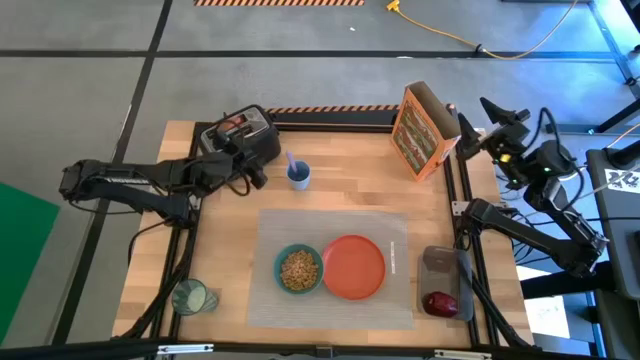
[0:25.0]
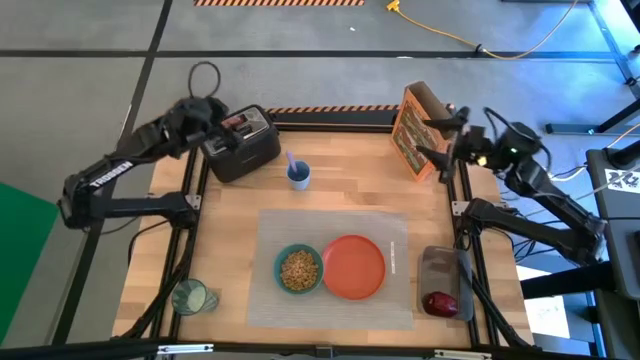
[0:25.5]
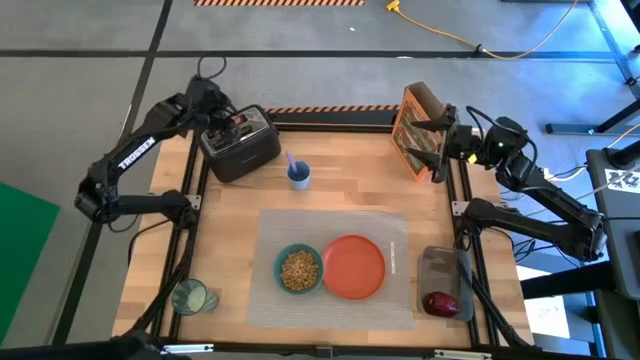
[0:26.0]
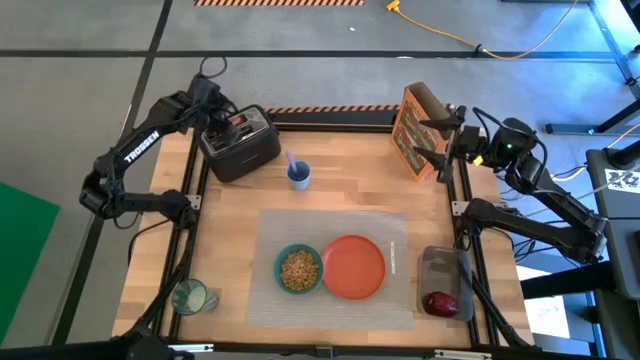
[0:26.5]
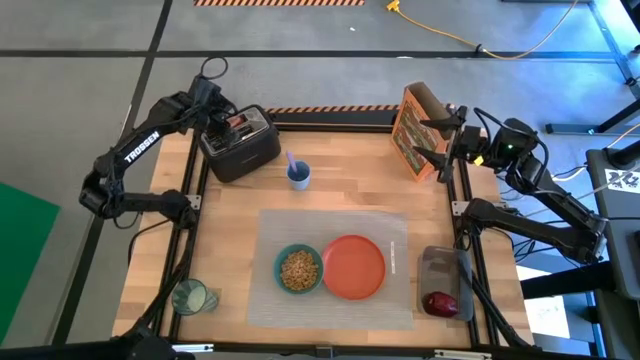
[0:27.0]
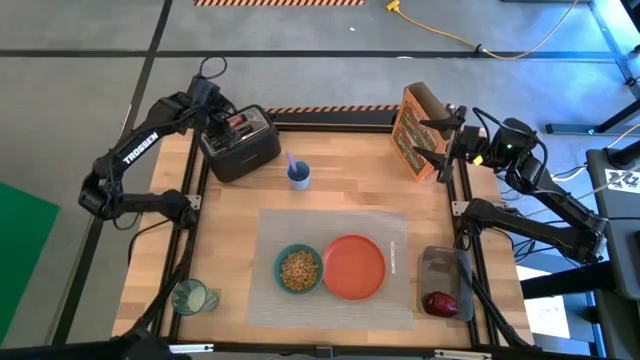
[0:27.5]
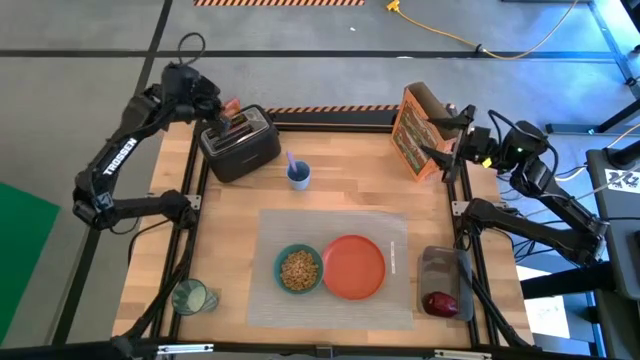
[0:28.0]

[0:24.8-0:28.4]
Task: Arrange a breakfast setting
Put the toasted bread from the toaster onto the orange plate

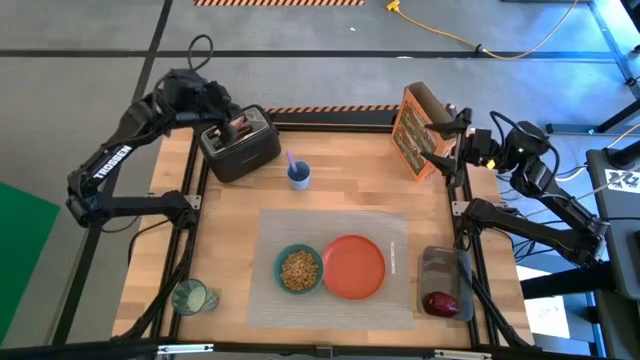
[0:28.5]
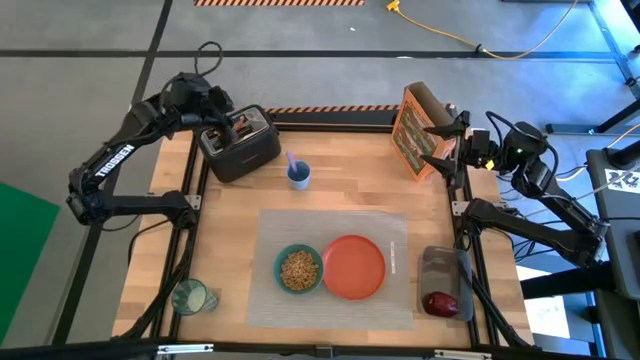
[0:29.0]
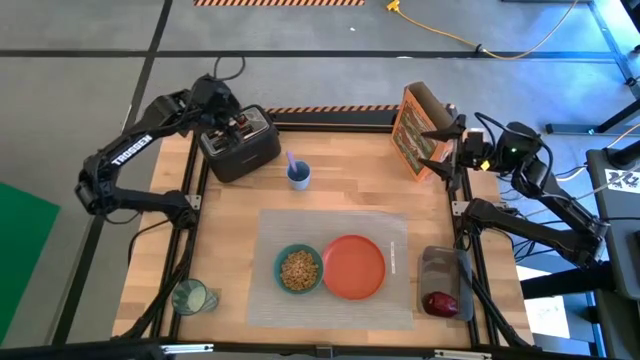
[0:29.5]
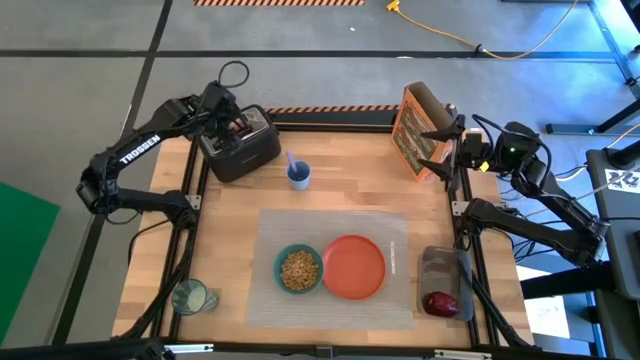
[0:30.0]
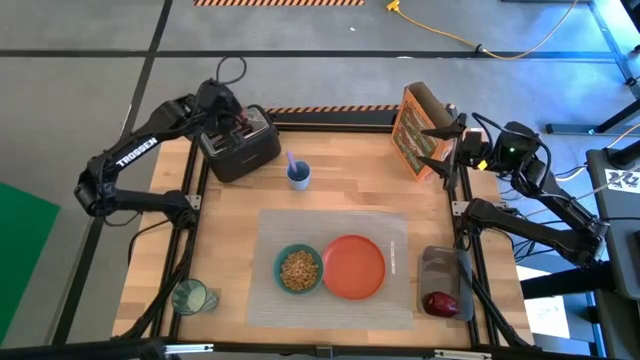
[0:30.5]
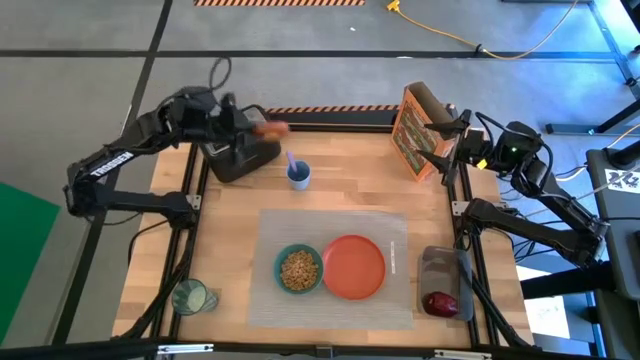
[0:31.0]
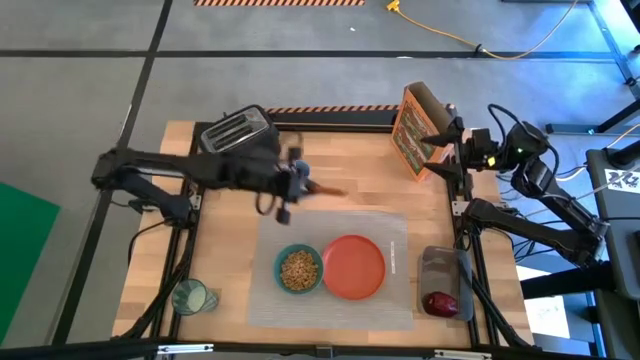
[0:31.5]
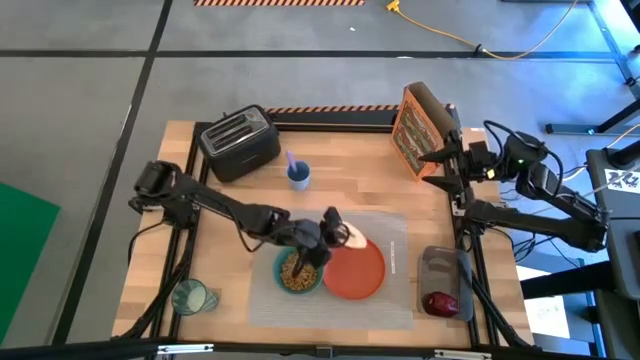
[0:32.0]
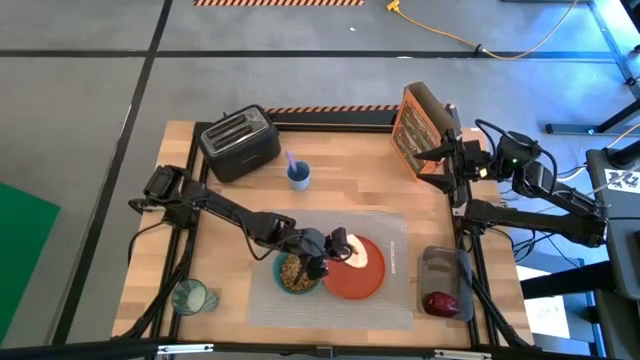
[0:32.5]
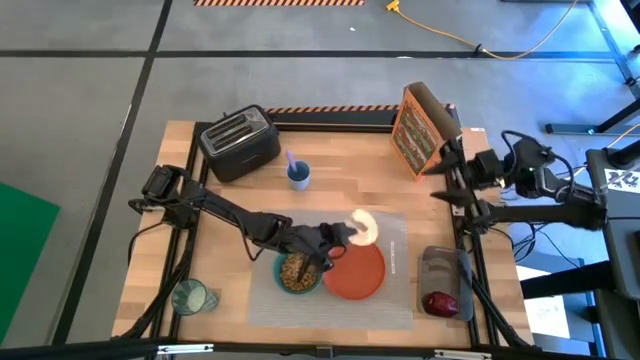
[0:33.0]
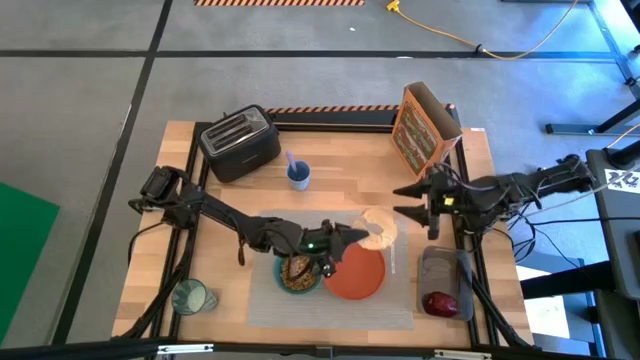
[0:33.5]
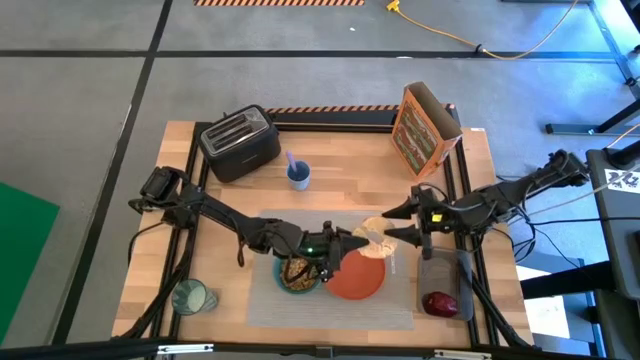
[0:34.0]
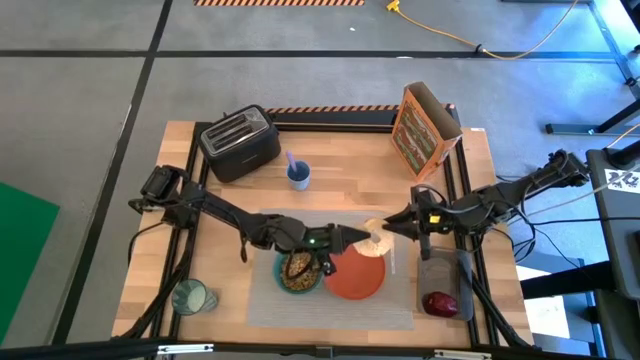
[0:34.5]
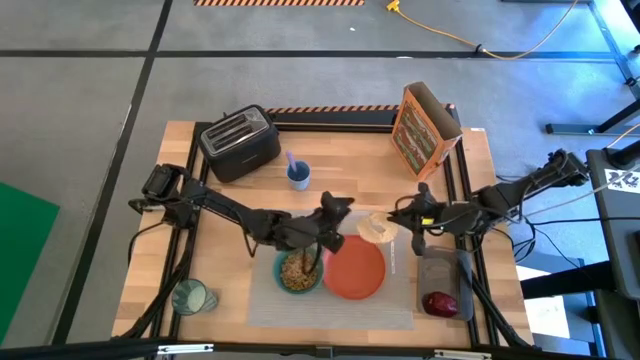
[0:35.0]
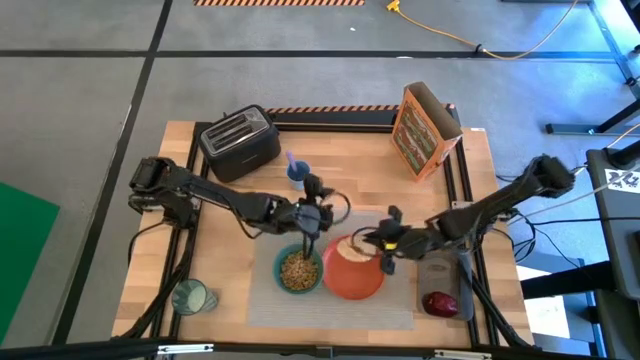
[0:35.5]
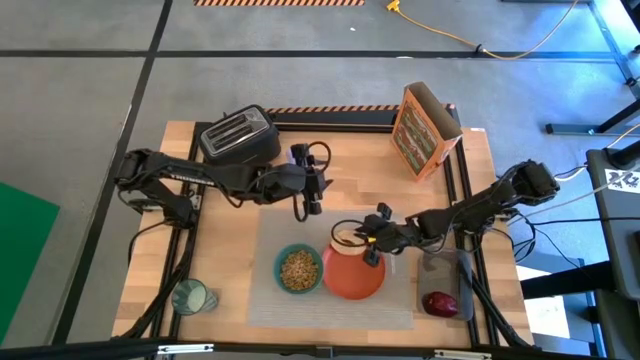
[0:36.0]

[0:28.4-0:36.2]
Put the toasted bread from the toaster onto the orange plate

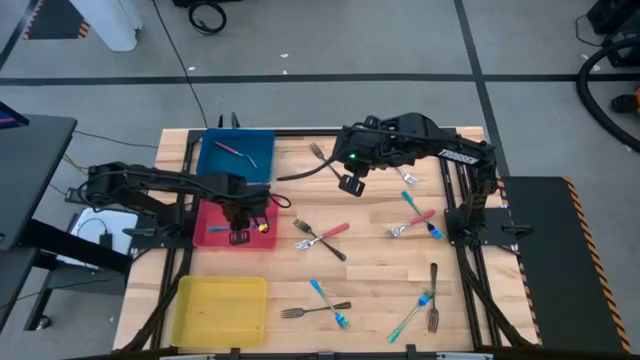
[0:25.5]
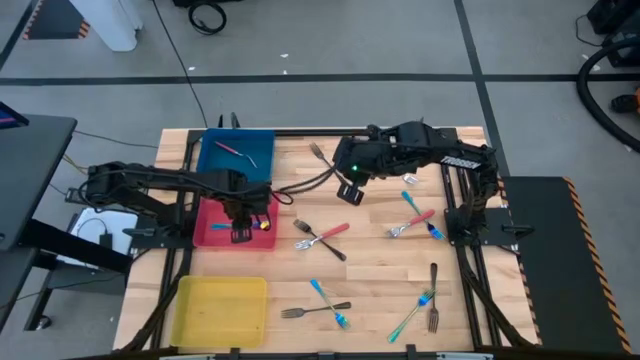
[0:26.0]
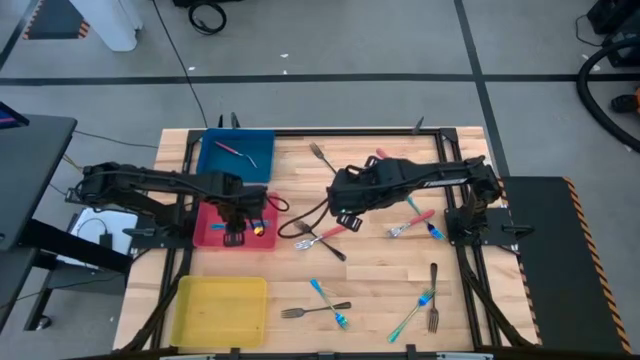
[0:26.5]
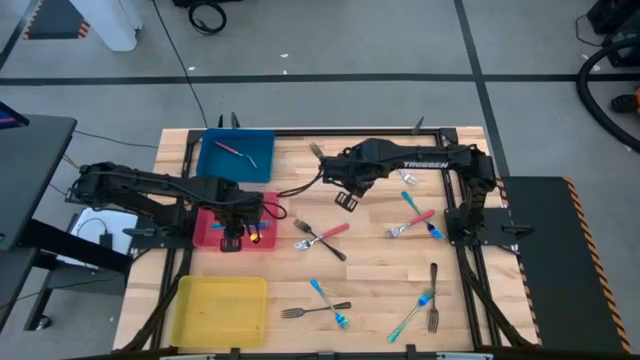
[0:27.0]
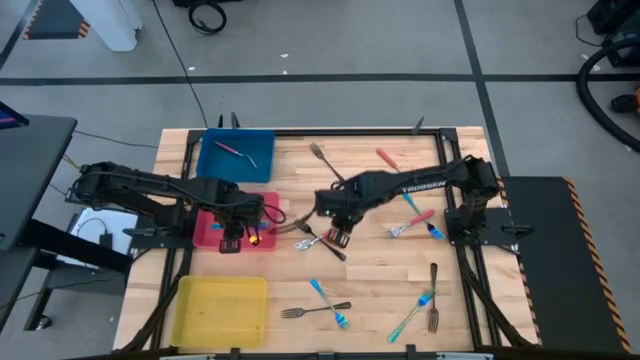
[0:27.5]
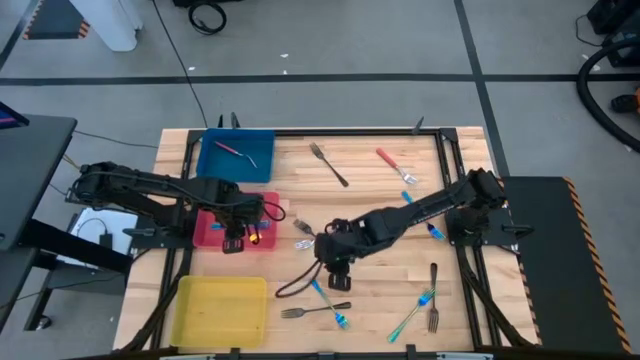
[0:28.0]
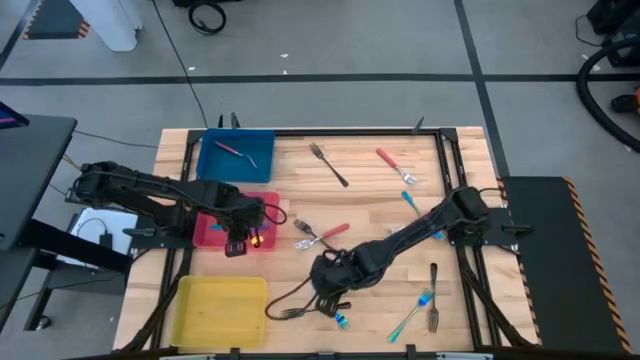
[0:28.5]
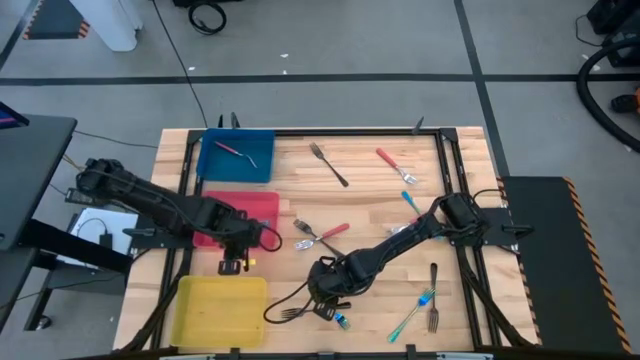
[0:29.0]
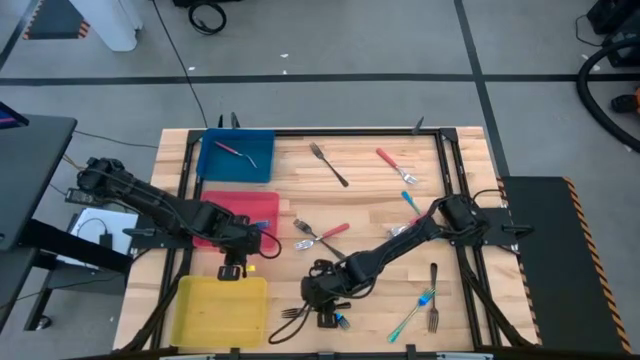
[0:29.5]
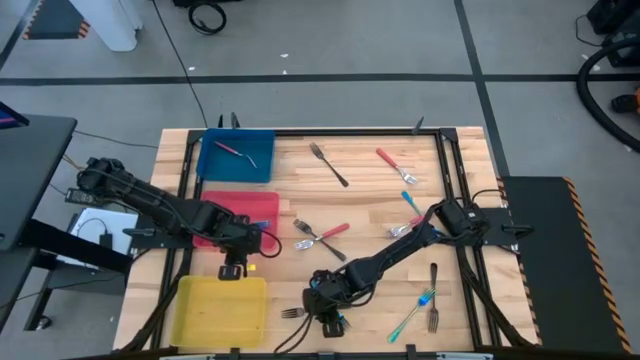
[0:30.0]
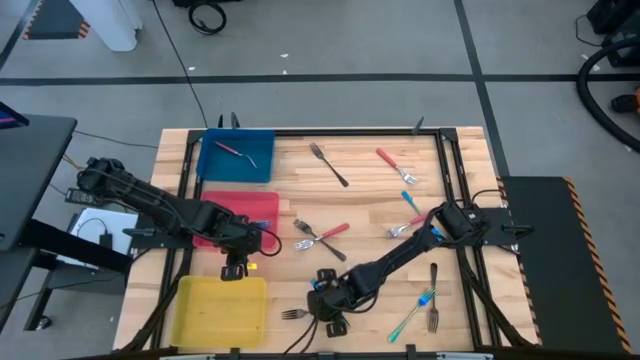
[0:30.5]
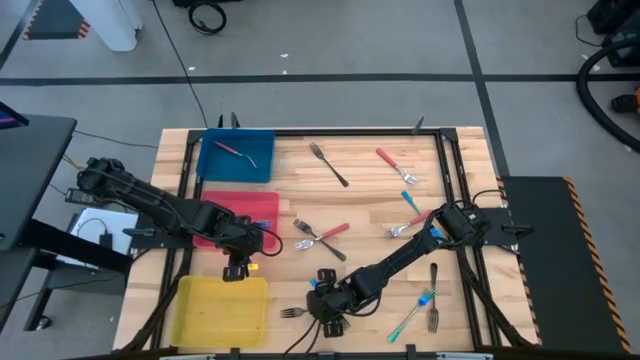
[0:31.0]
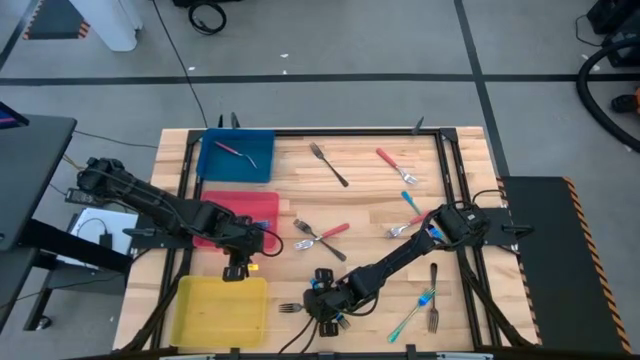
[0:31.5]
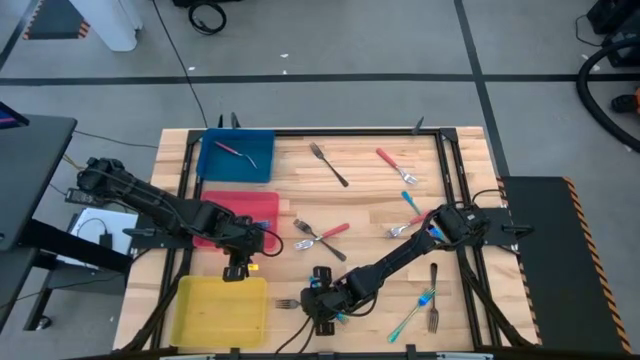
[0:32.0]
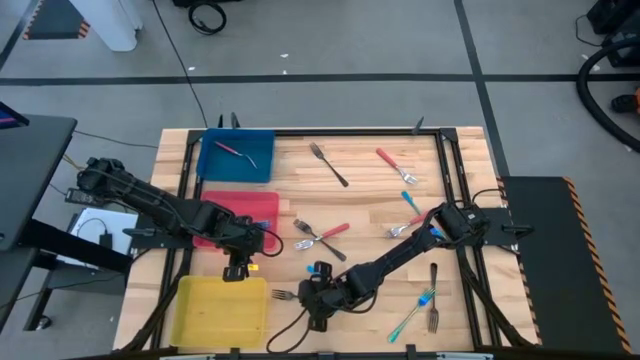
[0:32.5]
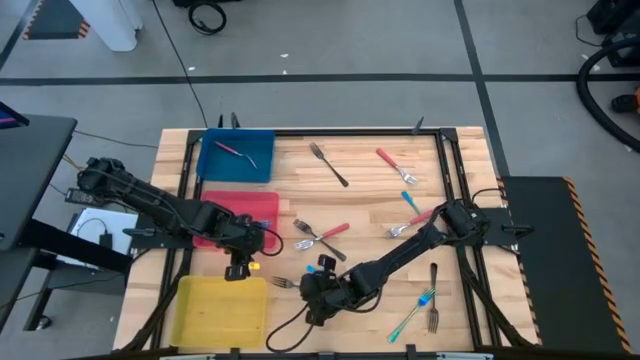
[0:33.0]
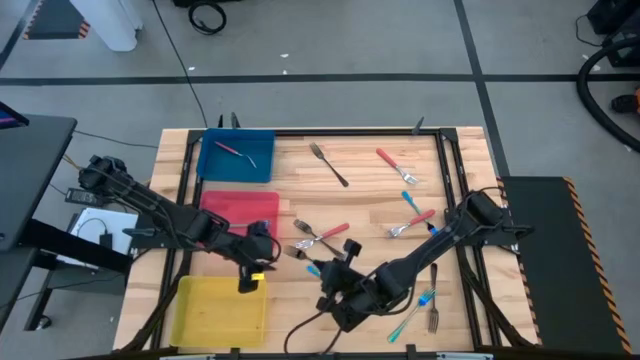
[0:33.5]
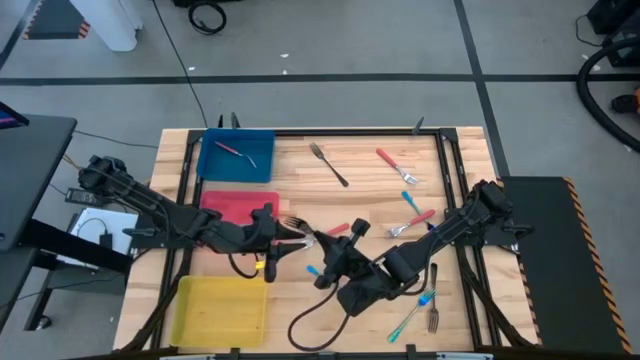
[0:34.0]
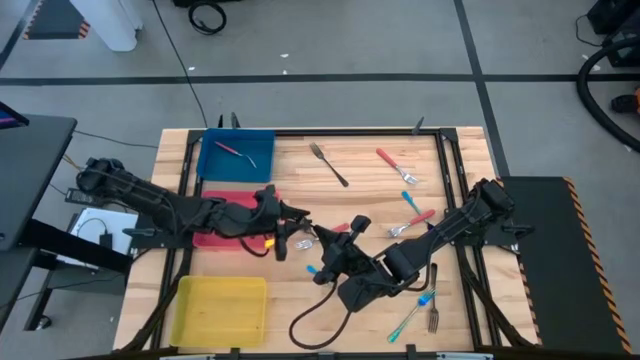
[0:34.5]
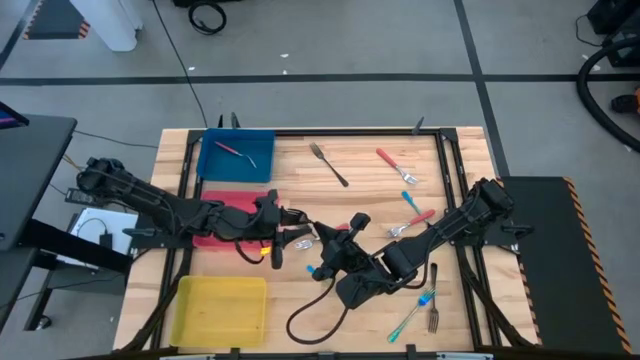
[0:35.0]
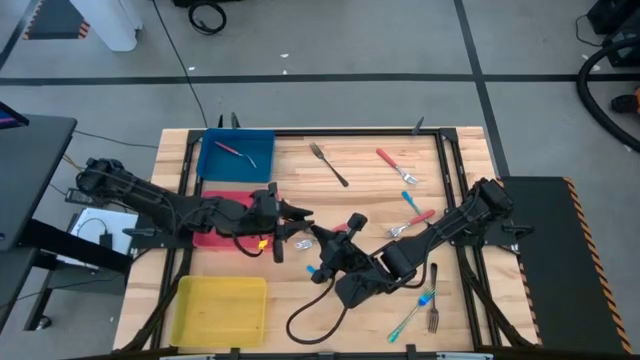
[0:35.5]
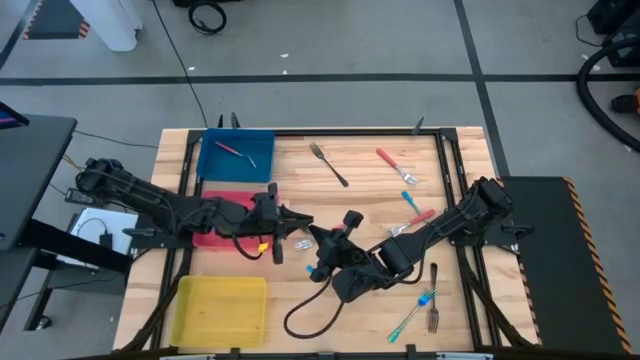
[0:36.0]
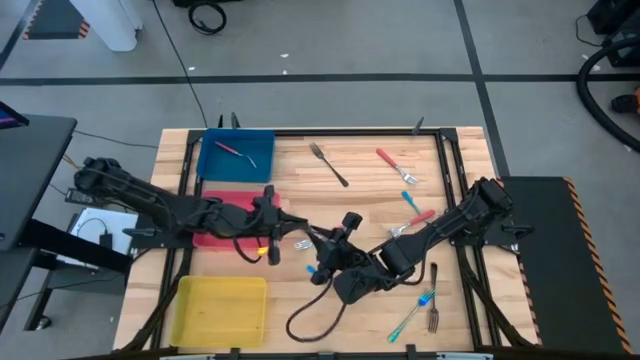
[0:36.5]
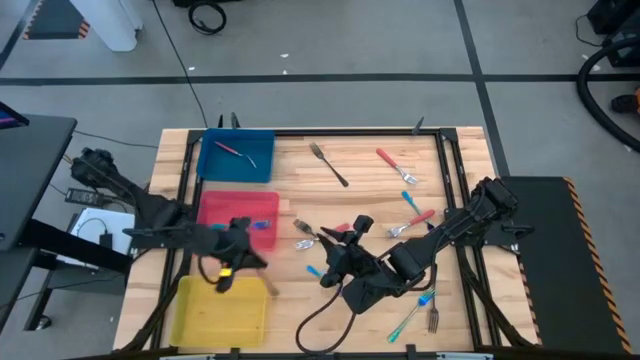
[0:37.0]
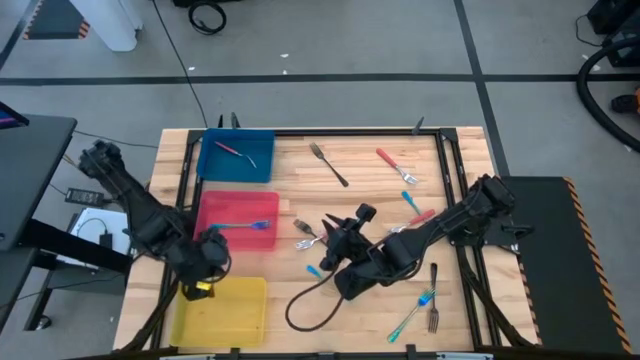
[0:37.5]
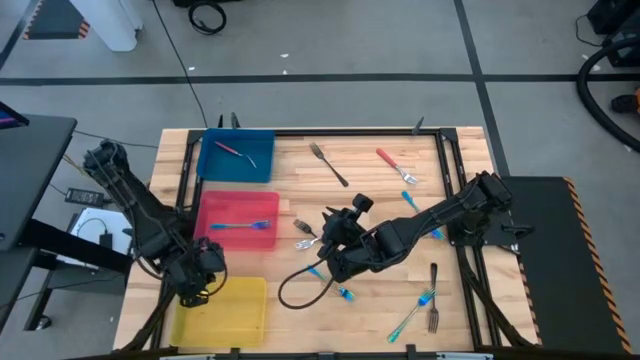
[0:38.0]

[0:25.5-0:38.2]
Task: Sort silverware by color (type)
Put the bottom left black fork into the yellow bin
